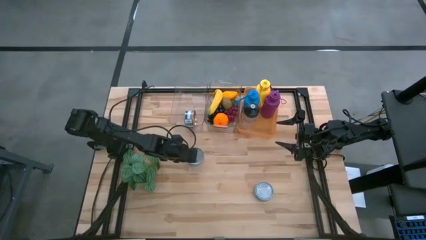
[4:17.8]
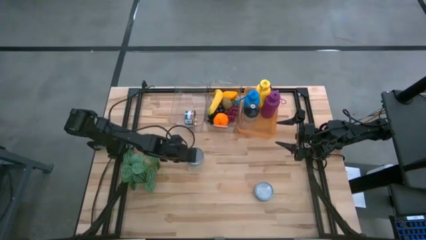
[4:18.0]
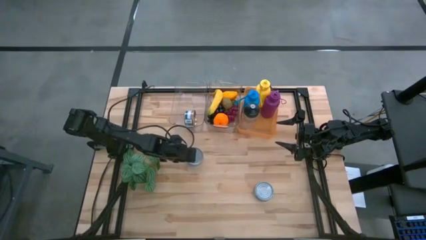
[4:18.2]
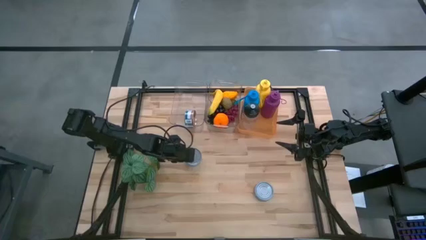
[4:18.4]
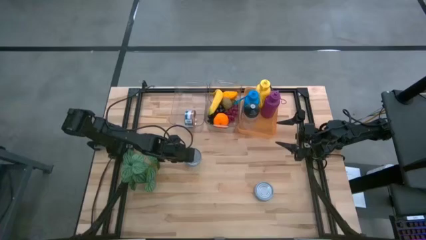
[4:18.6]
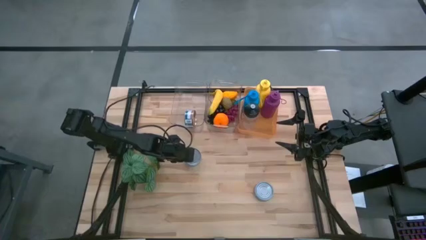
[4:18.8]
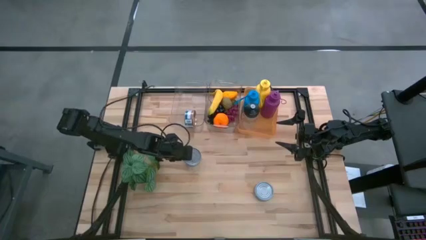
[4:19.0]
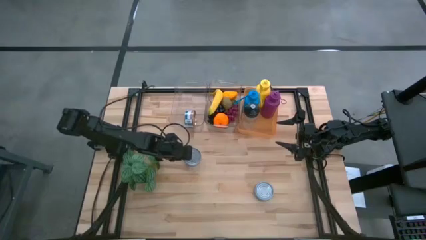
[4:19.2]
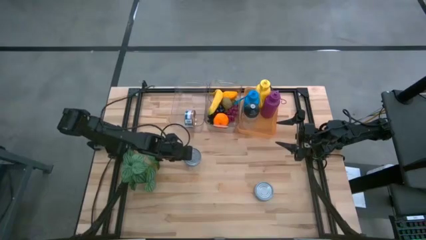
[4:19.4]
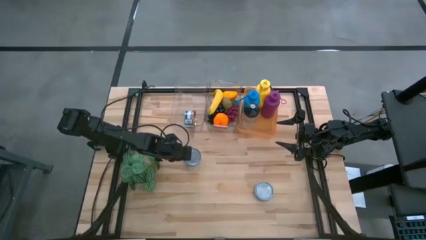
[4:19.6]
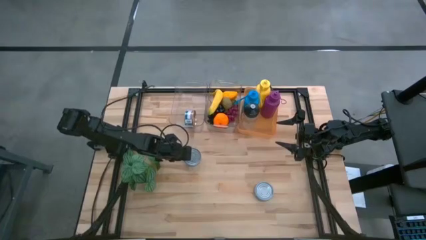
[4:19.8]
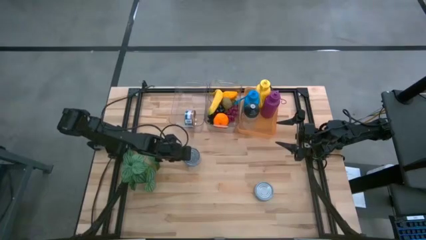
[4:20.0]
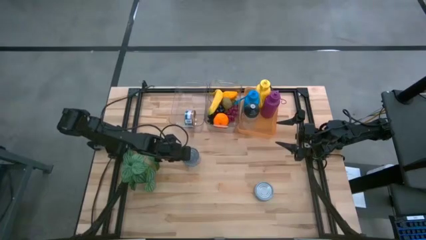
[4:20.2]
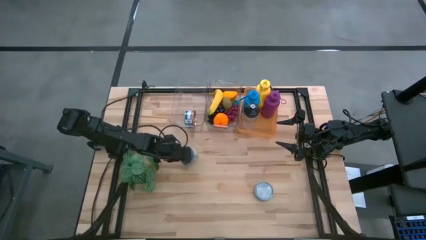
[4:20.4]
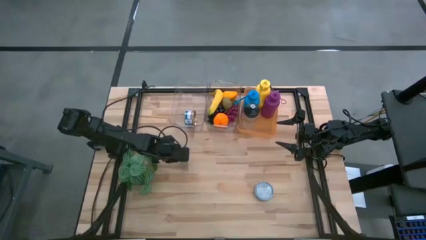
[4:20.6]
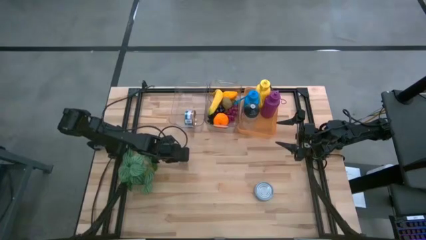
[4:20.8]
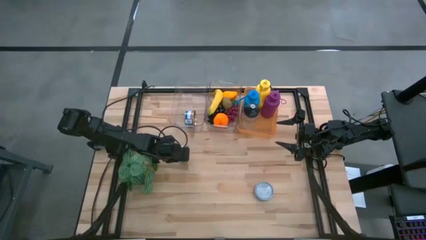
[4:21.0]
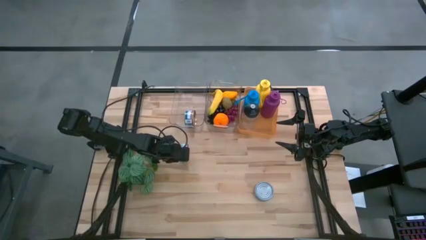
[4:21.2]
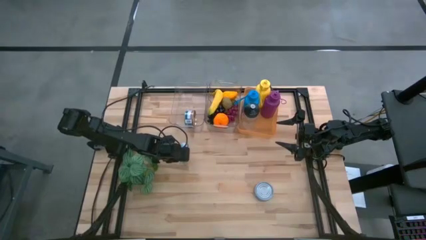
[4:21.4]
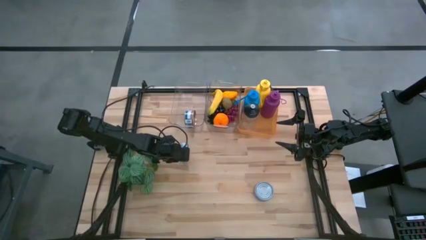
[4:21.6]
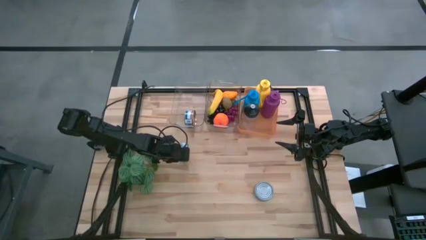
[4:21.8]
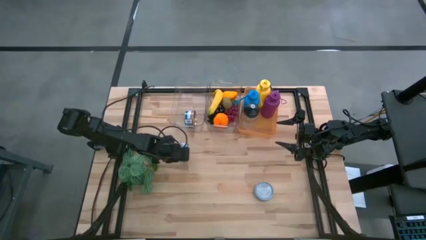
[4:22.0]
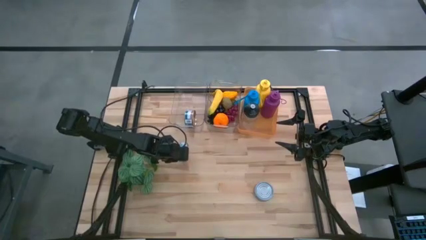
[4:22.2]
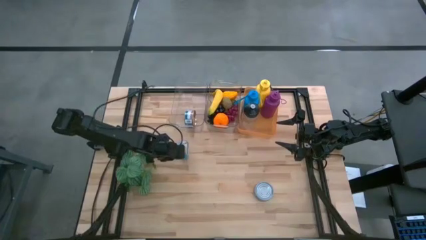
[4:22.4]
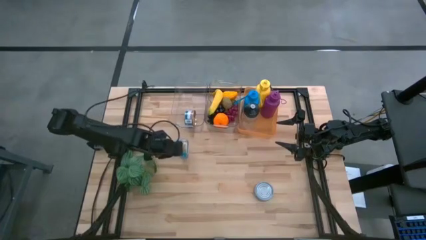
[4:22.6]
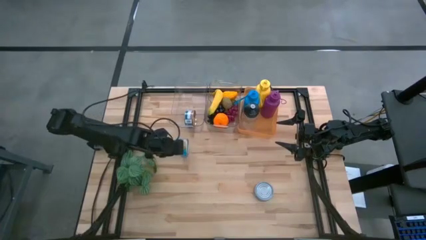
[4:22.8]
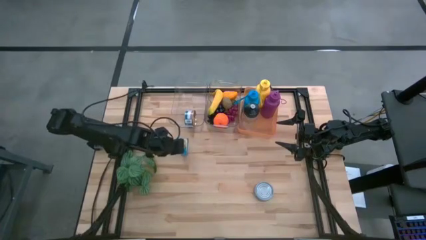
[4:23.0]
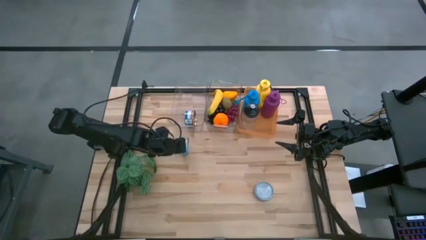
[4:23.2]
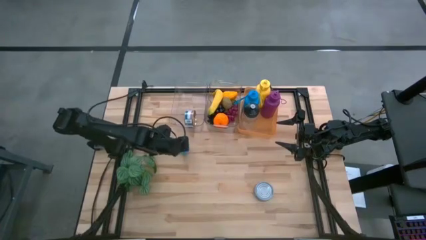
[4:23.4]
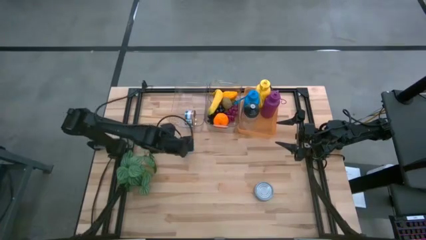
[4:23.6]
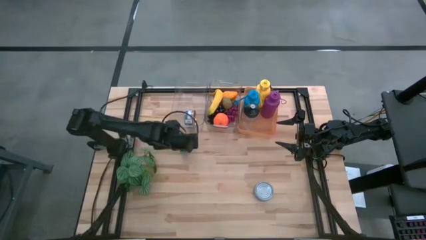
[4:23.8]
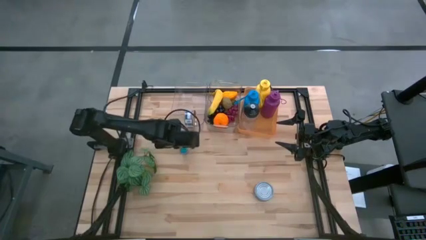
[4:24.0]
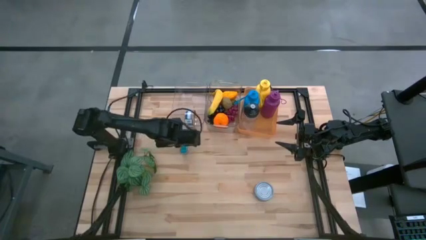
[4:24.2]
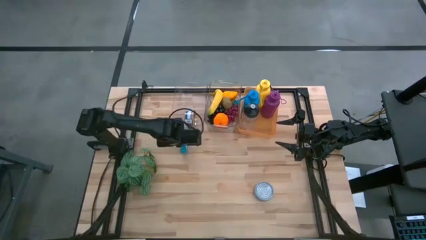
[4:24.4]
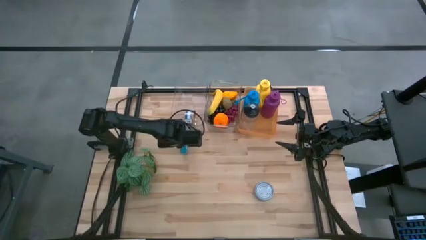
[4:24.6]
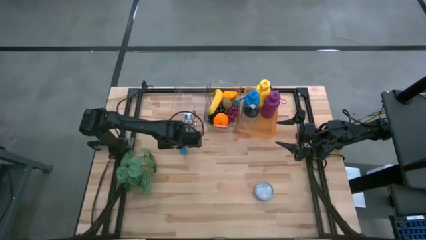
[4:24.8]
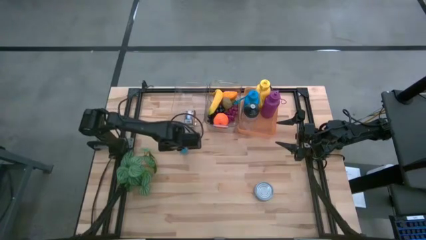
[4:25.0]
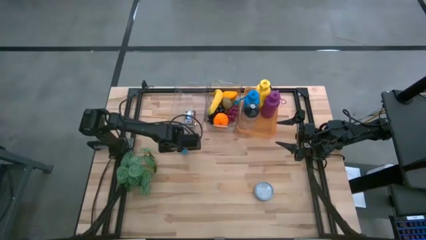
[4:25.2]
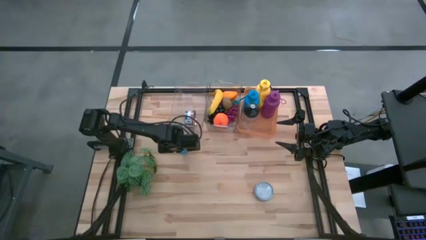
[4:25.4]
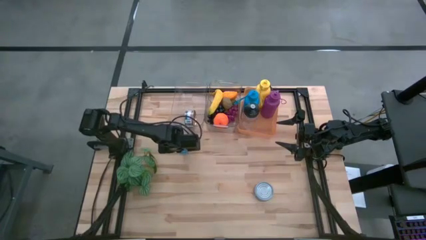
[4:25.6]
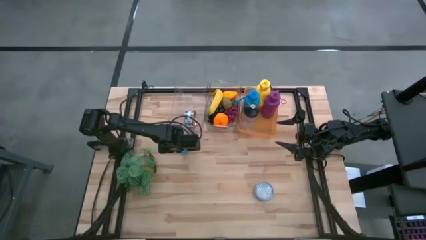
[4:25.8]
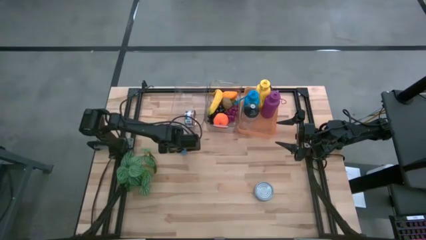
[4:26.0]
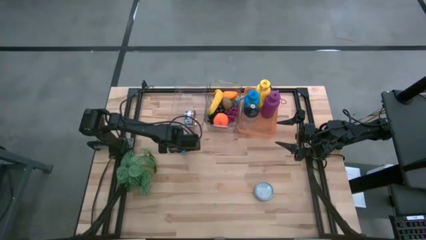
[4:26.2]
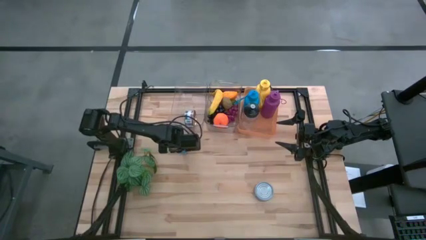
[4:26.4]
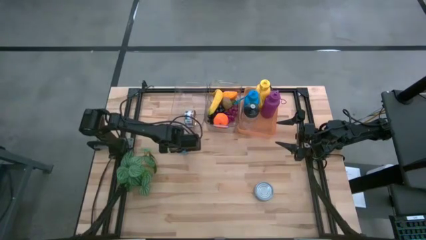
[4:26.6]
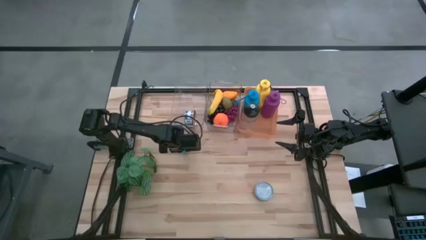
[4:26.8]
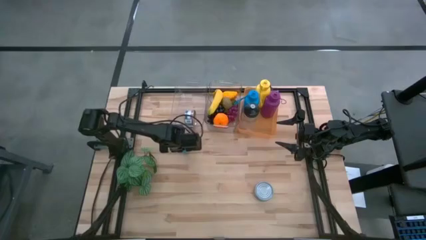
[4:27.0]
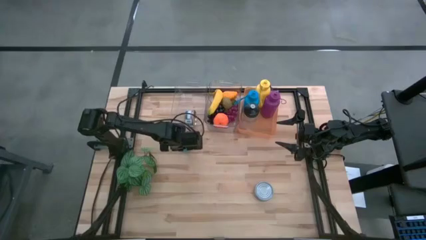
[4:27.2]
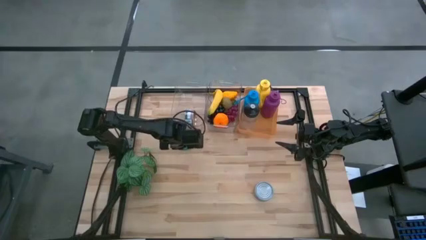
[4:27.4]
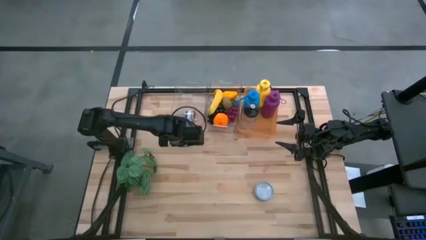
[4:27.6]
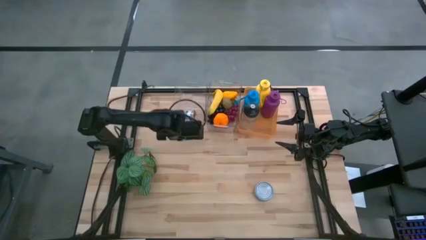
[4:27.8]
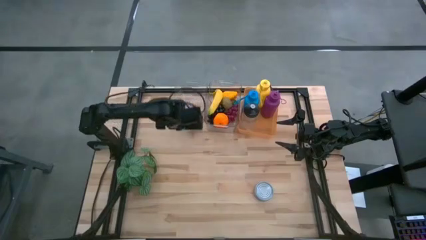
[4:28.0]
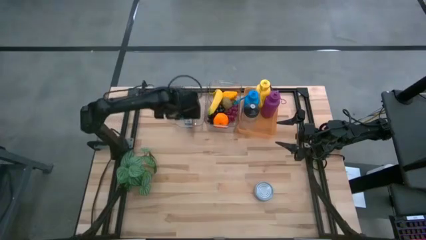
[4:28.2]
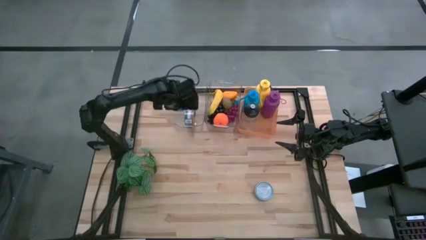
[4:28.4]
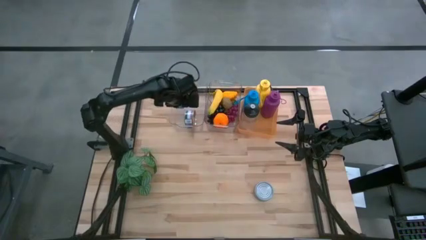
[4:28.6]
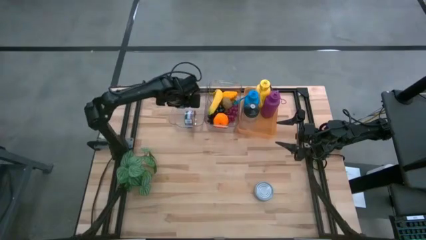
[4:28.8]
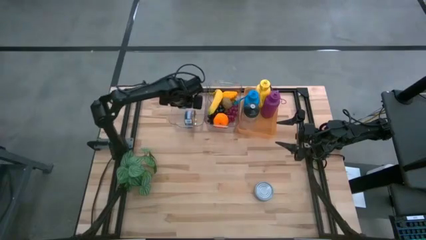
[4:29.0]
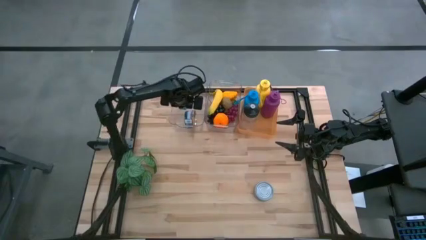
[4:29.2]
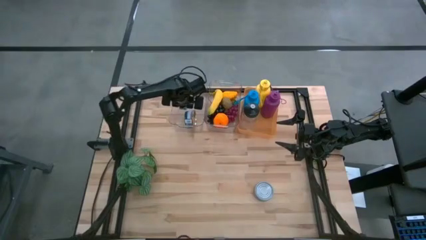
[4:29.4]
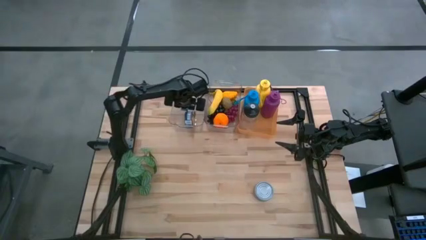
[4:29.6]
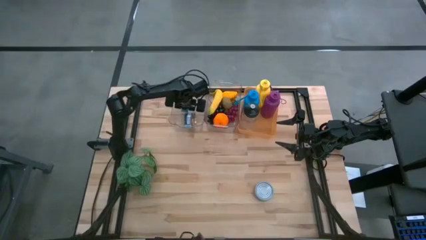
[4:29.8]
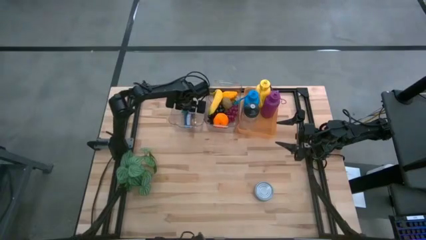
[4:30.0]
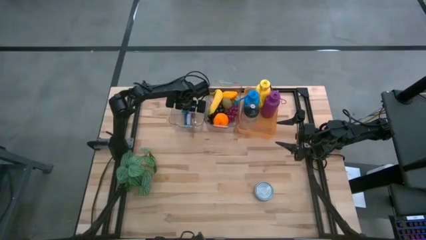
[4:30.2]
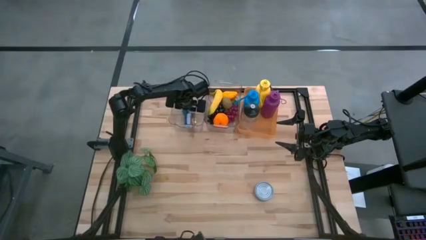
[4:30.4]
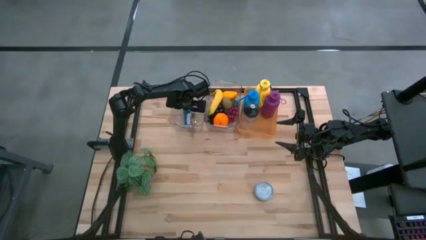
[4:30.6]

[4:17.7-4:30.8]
Task: Pick & Place Food Item
Put the yellow and blue tuna can into the left transparent bin
